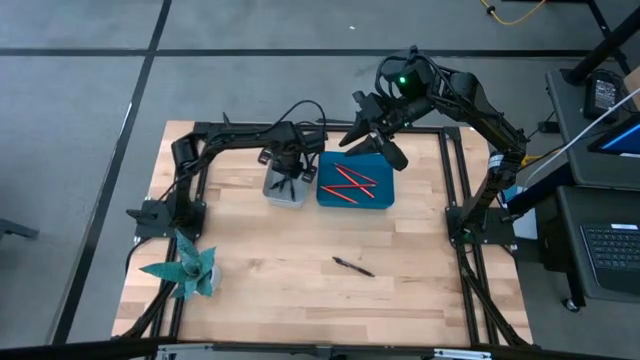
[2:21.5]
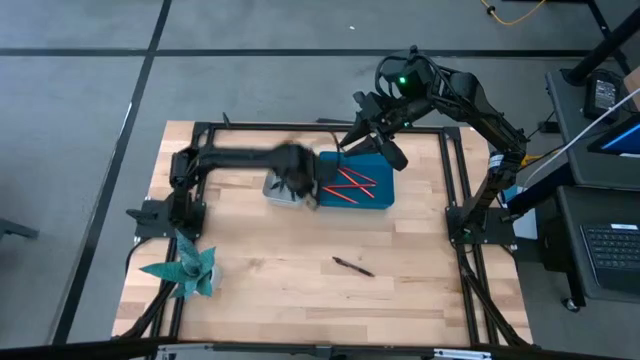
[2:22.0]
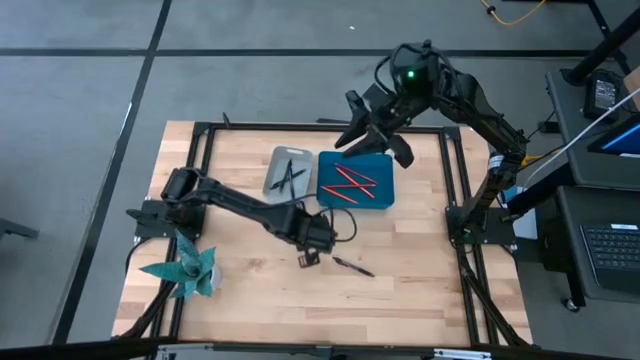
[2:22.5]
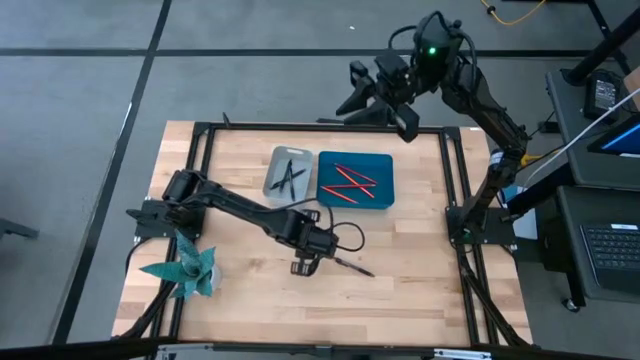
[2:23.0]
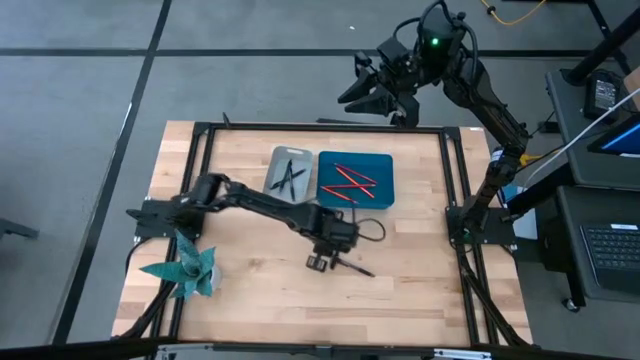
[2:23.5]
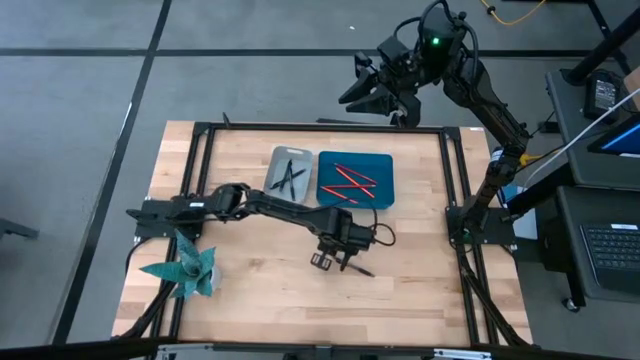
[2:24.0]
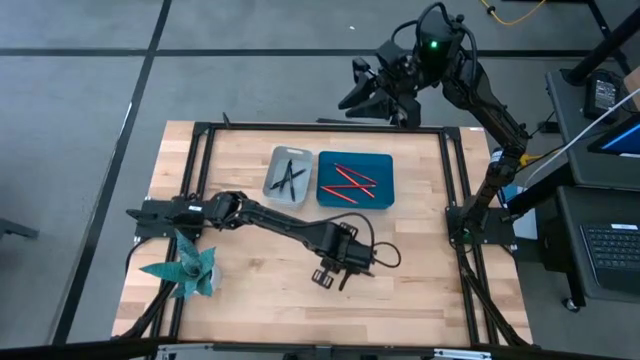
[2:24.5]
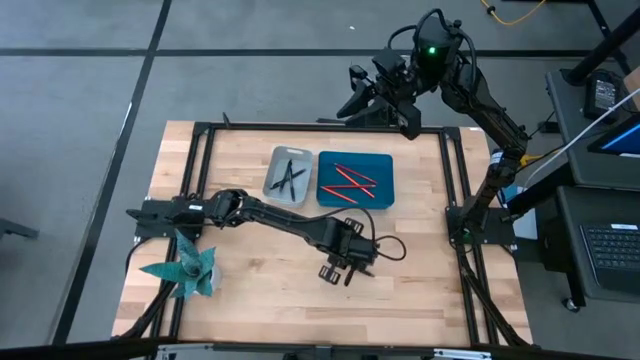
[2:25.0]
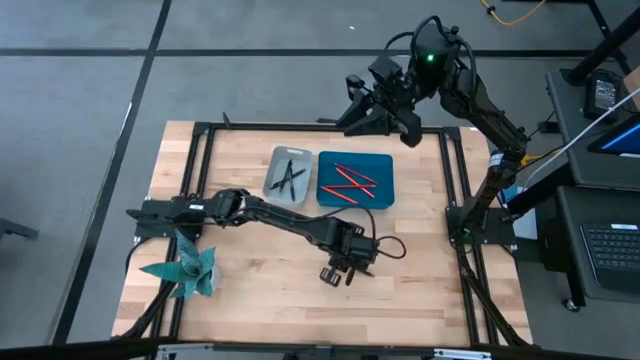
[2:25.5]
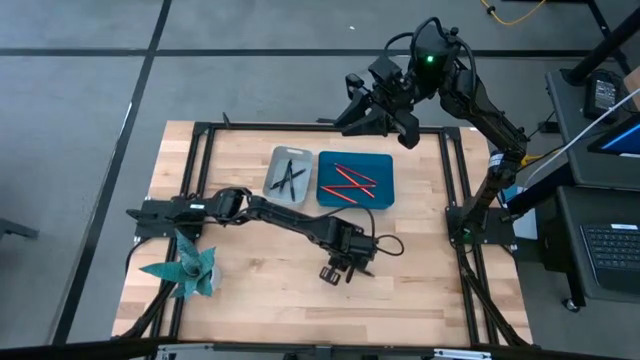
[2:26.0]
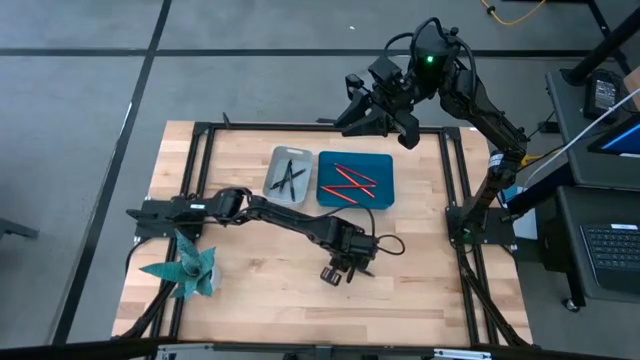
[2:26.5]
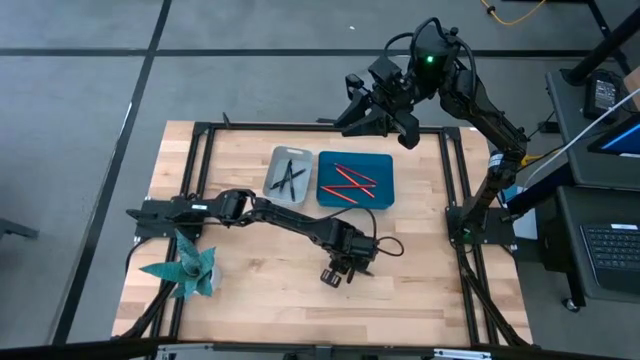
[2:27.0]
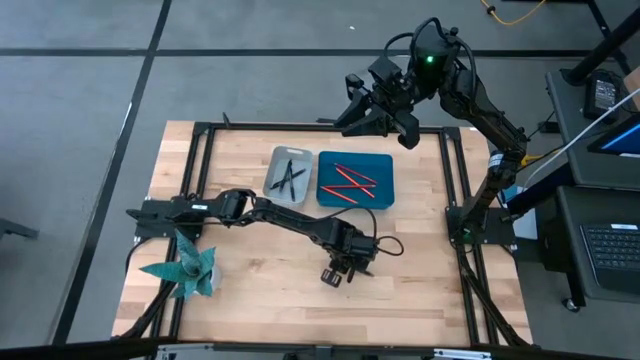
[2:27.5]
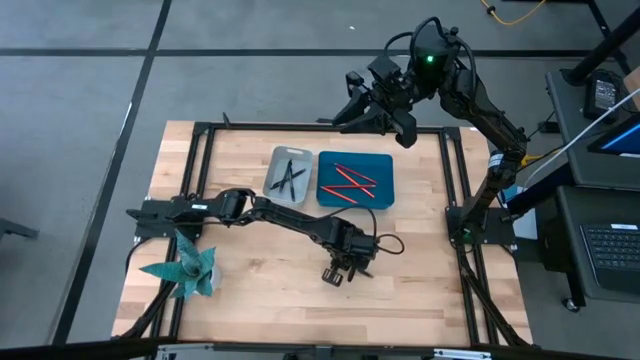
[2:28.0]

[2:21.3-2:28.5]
Task: Sort pens & pencils
Put the black pen into the gray bin

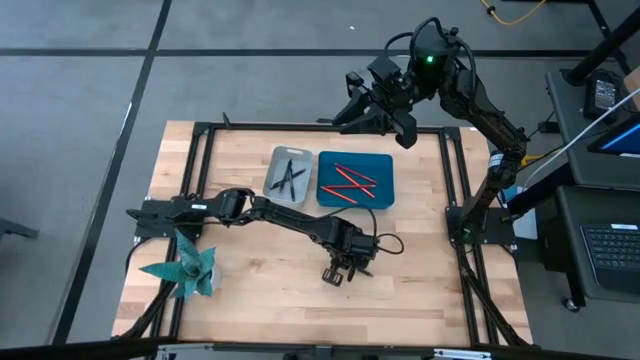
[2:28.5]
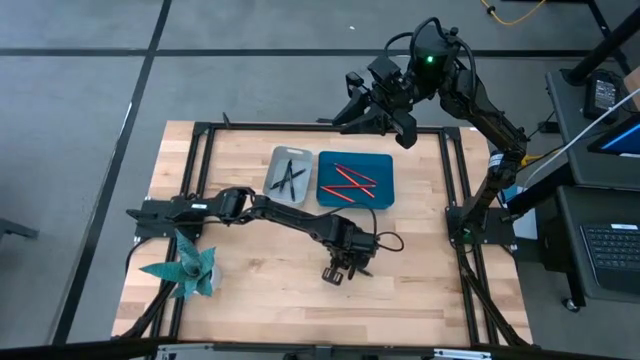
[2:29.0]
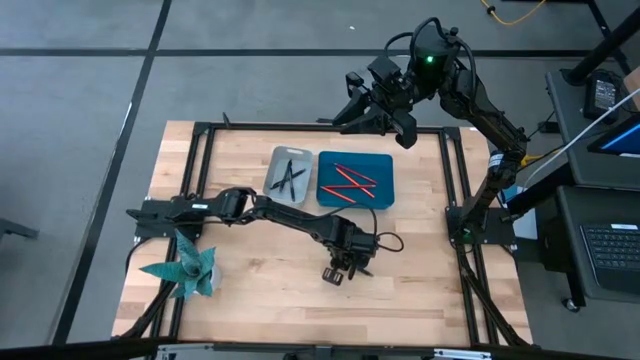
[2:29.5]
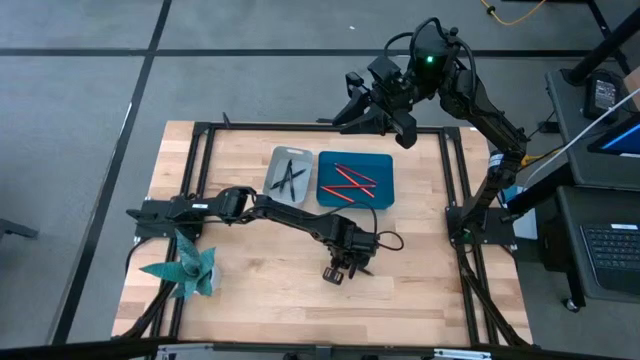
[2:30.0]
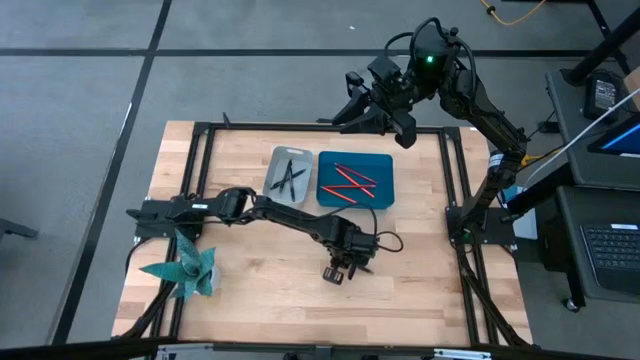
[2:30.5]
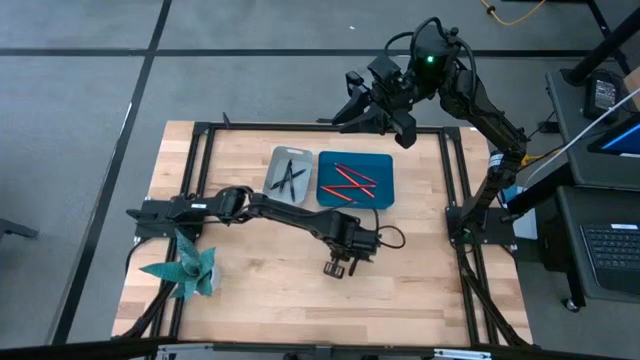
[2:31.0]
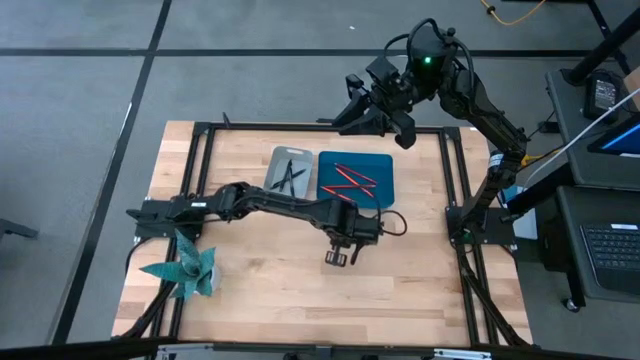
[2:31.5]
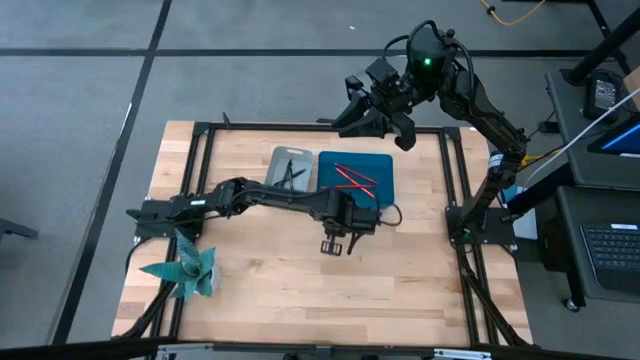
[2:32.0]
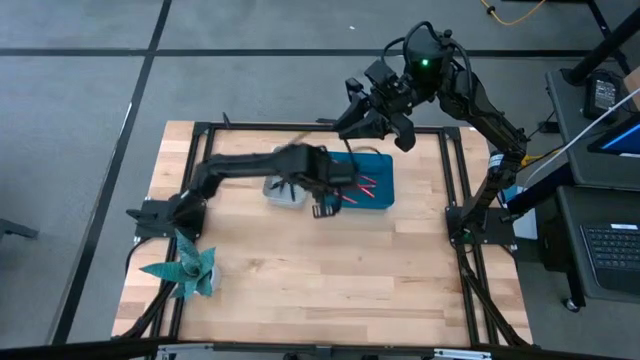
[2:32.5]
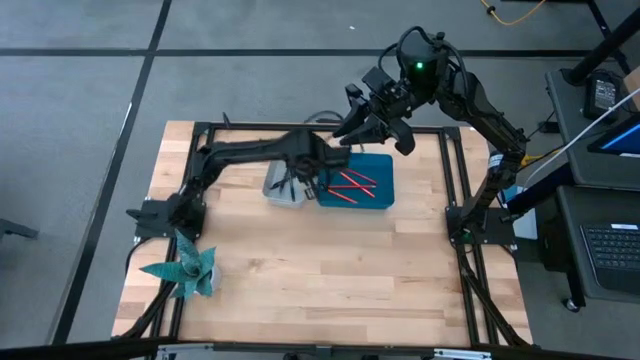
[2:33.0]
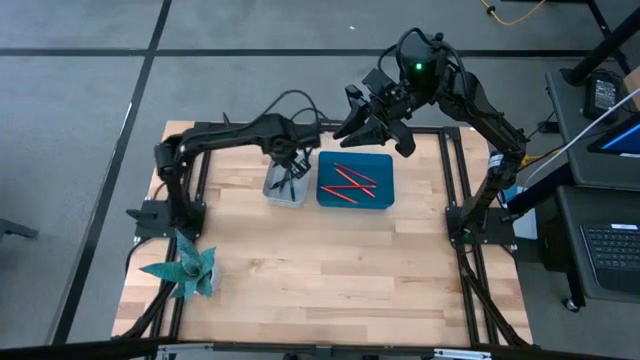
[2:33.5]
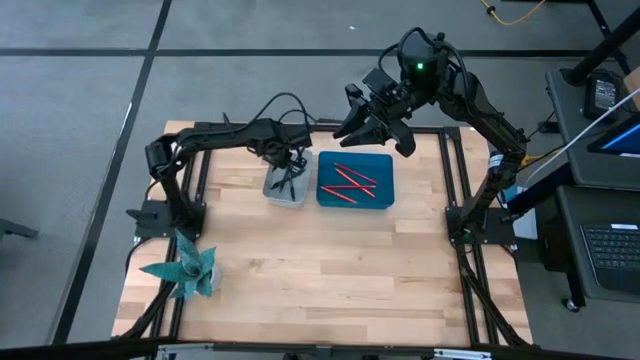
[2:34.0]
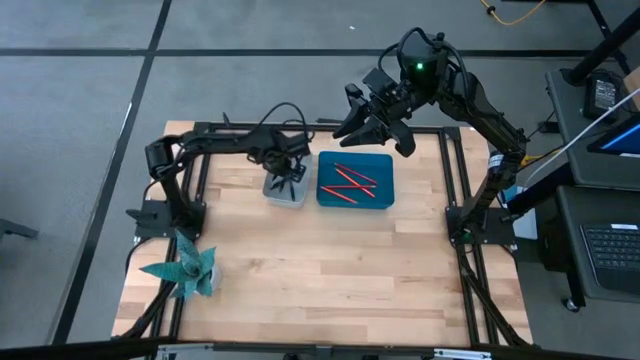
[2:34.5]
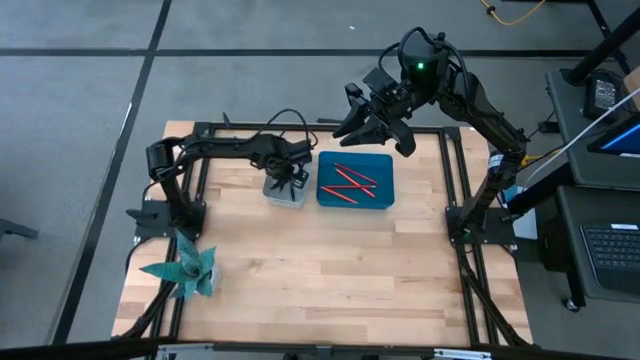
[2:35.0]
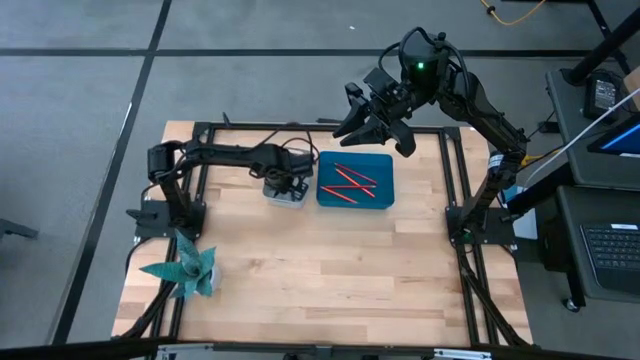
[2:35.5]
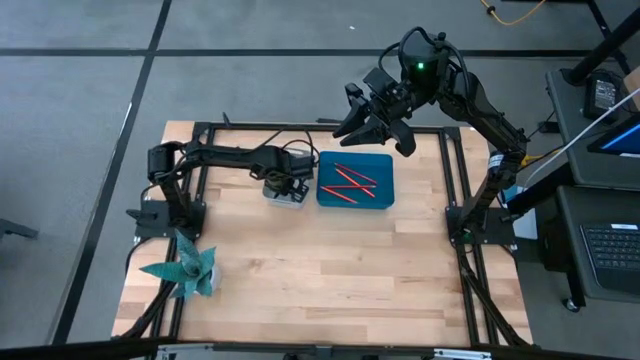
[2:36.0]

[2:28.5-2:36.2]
Put the black pen into the gray bin

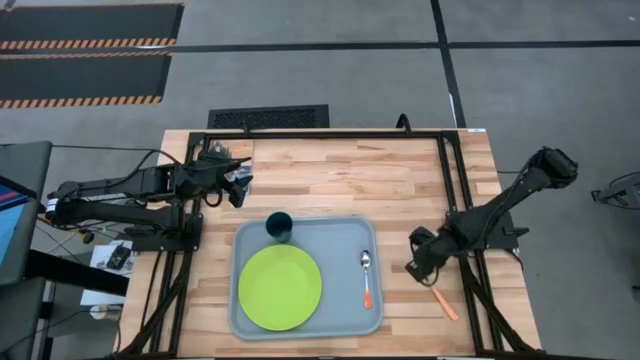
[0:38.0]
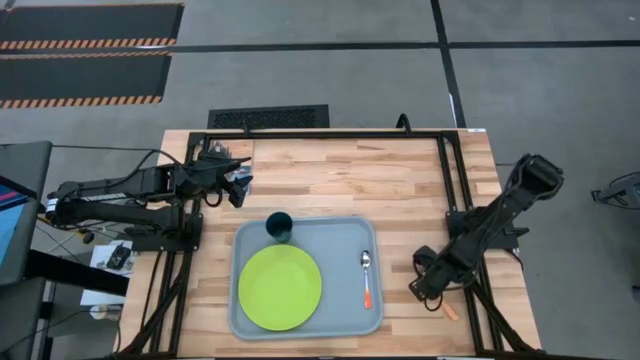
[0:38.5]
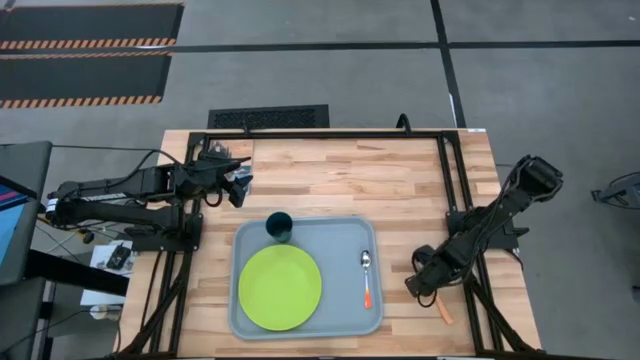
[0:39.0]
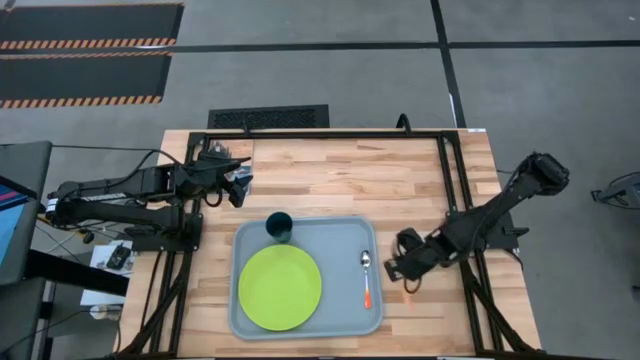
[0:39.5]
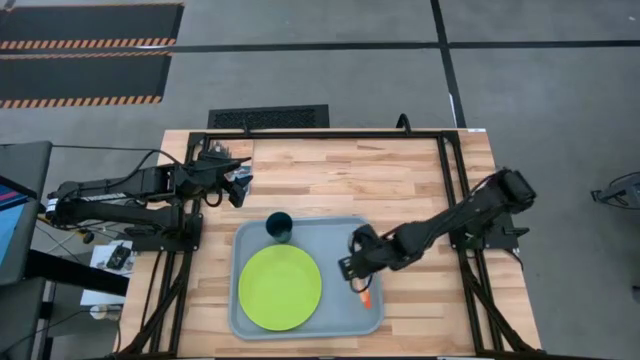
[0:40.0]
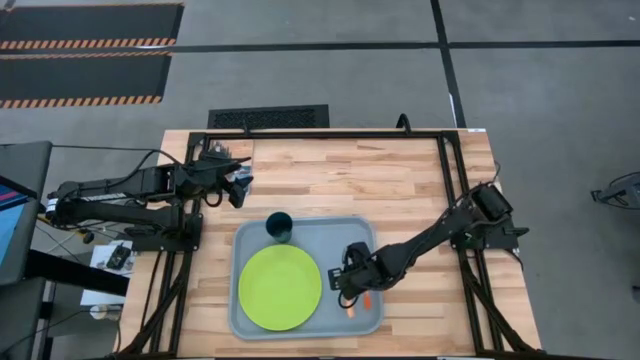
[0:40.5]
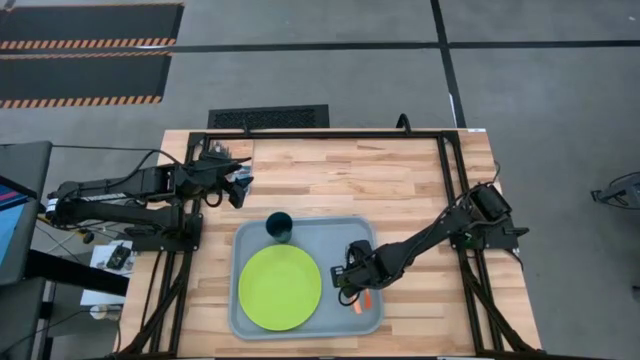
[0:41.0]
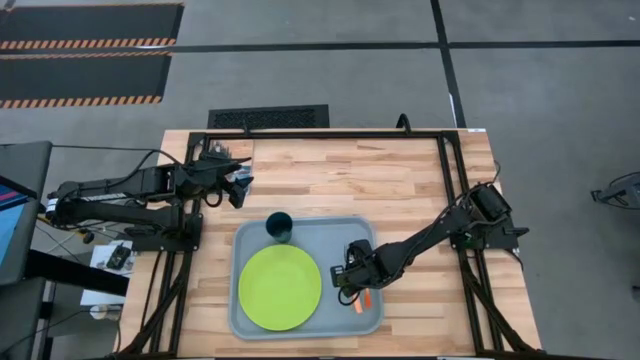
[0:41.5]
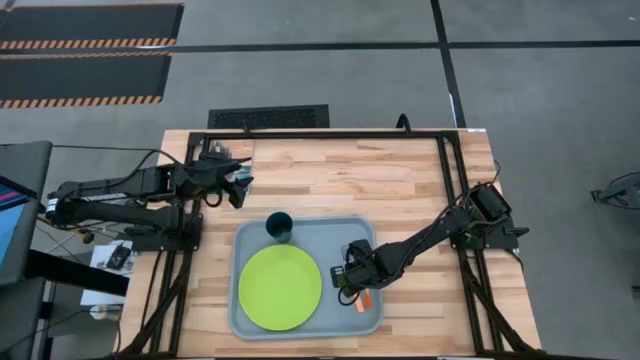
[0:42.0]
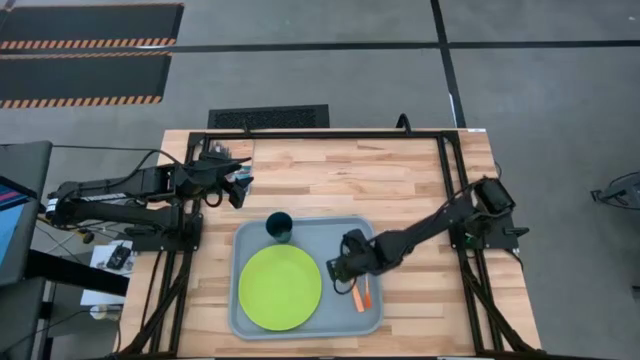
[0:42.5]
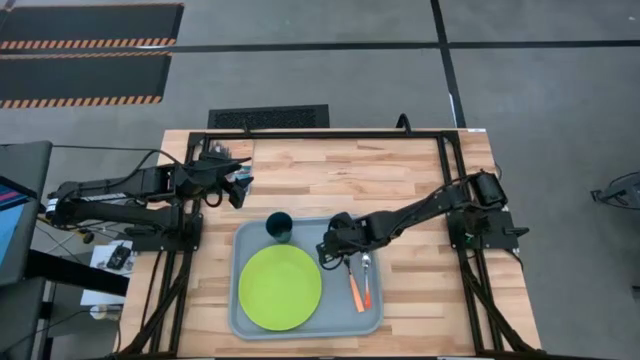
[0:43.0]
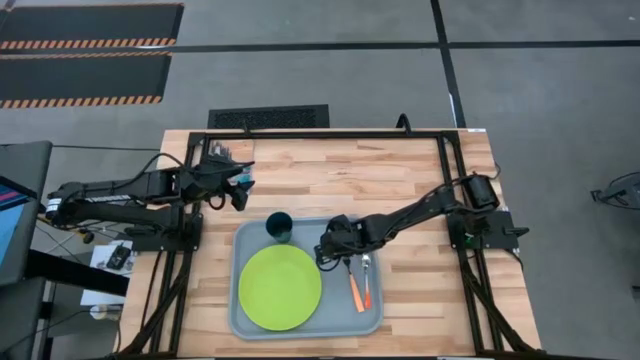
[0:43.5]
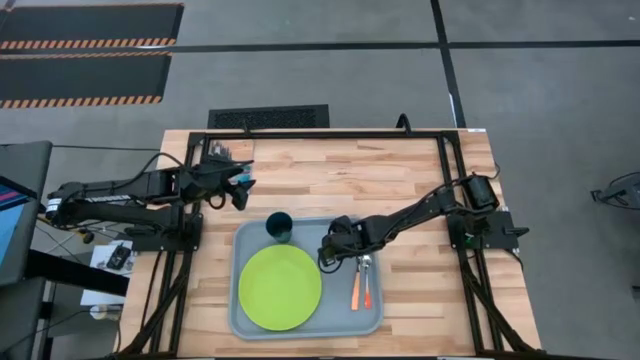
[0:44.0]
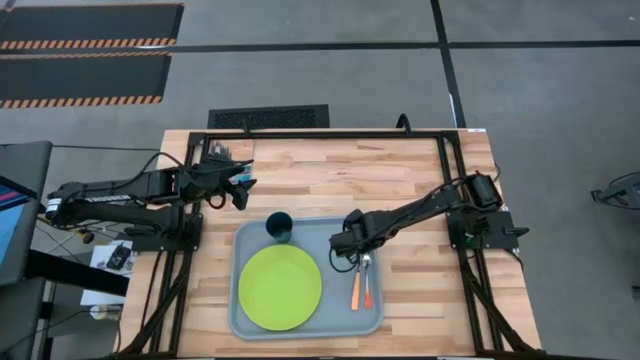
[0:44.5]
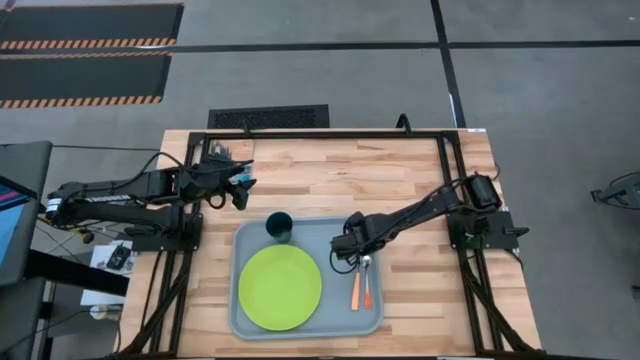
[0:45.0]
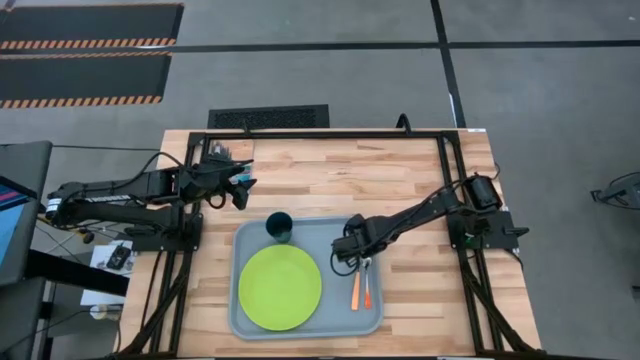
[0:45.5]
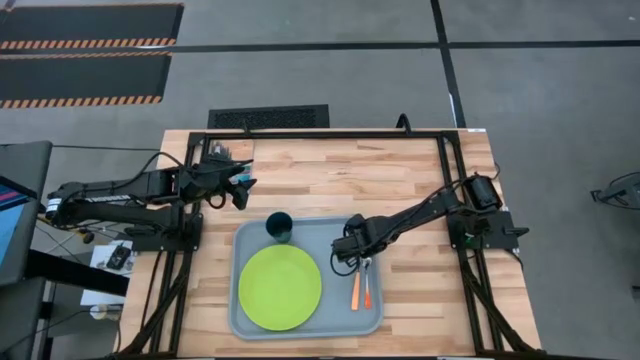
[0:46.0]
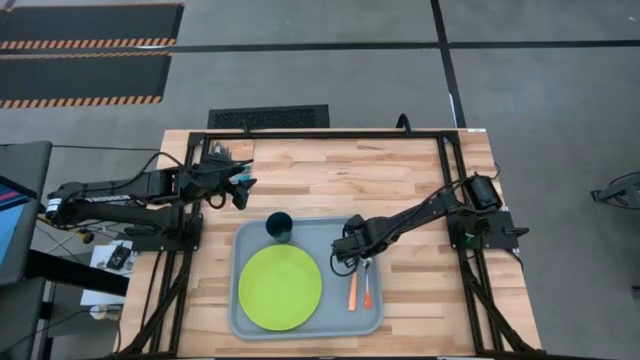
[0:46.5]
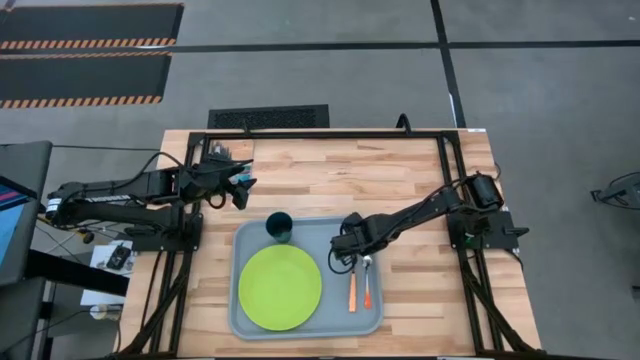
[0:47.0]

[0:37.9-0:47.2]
Task: Pick and place plate/cup/fork/spoon on tray
Put the orange fork on the gray serving tray to the left of the orange spoon
